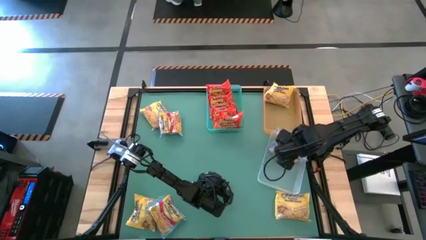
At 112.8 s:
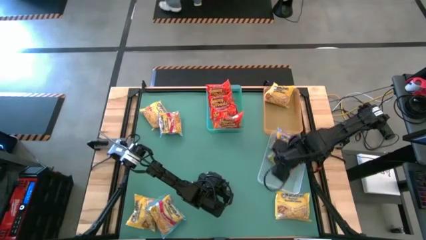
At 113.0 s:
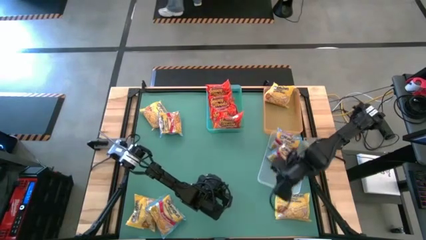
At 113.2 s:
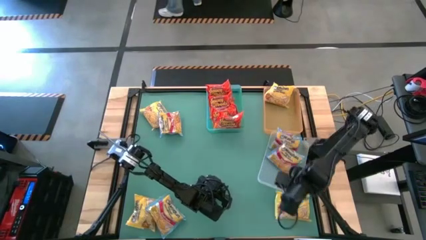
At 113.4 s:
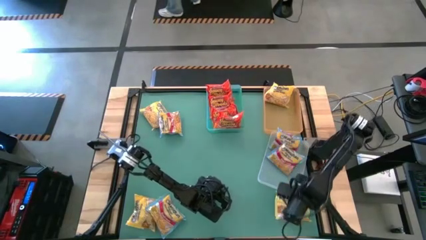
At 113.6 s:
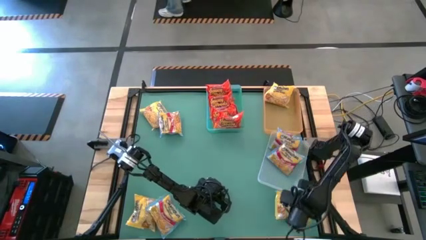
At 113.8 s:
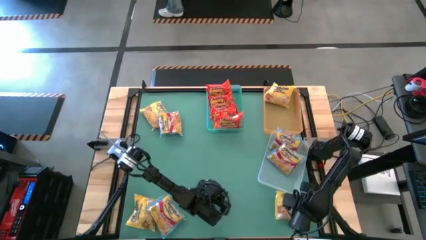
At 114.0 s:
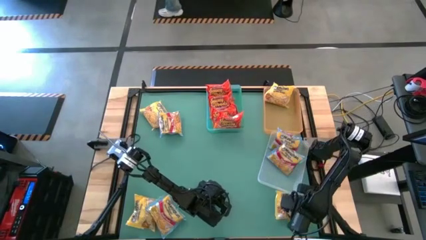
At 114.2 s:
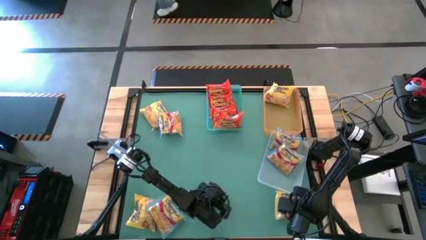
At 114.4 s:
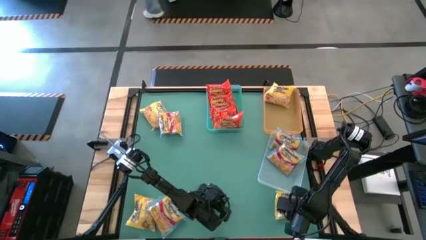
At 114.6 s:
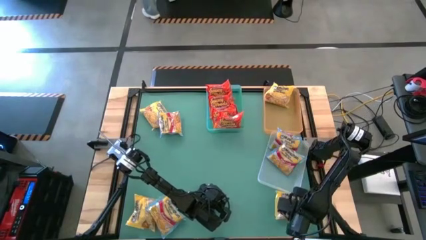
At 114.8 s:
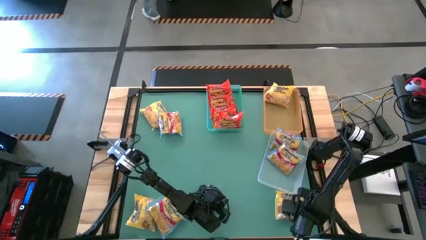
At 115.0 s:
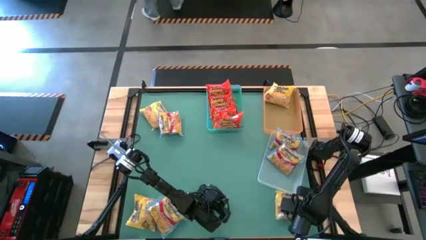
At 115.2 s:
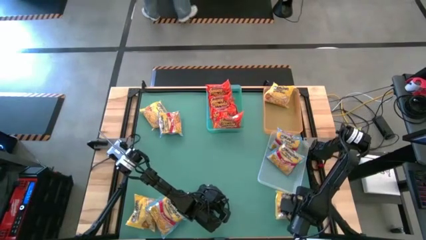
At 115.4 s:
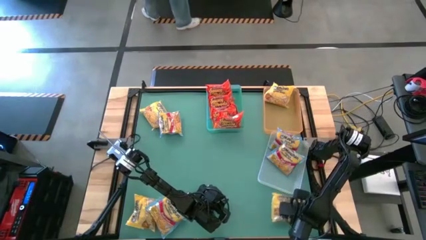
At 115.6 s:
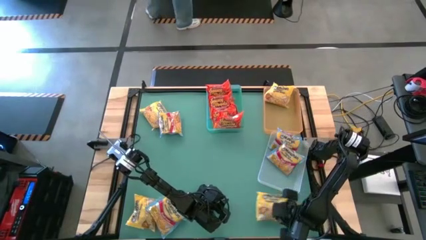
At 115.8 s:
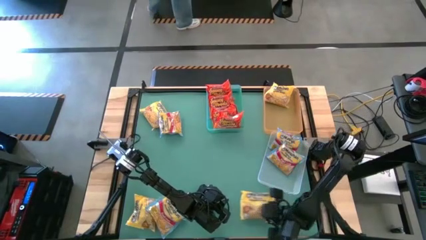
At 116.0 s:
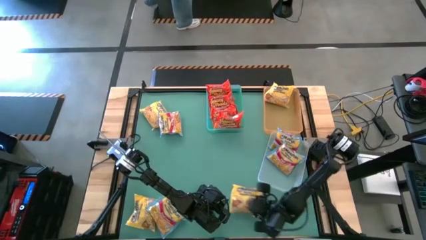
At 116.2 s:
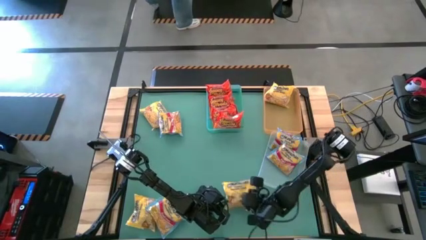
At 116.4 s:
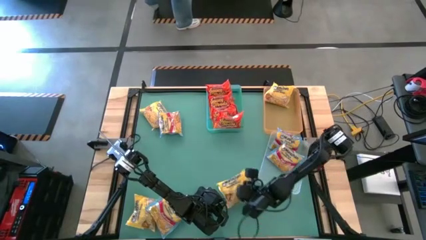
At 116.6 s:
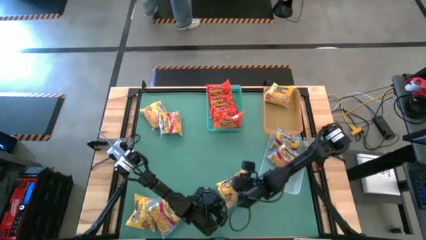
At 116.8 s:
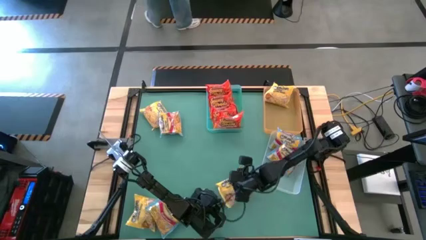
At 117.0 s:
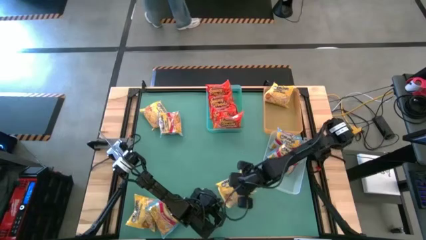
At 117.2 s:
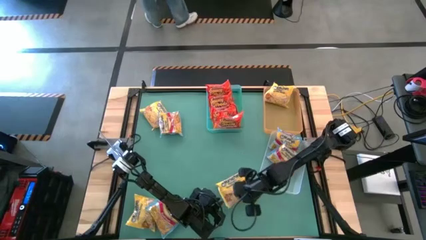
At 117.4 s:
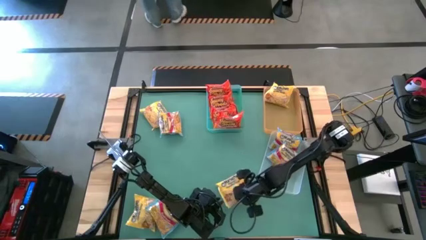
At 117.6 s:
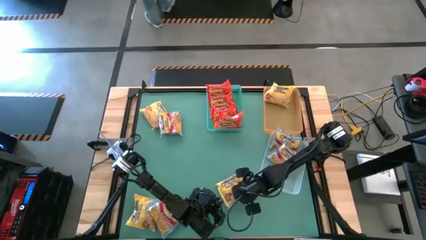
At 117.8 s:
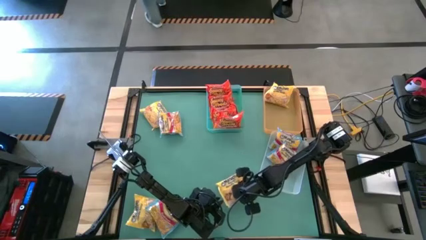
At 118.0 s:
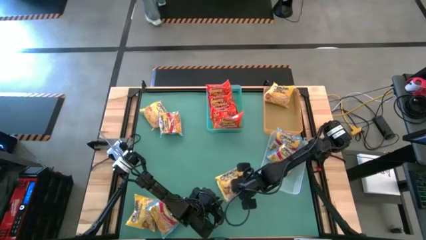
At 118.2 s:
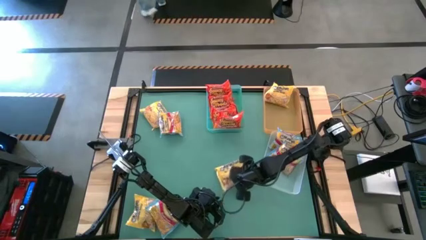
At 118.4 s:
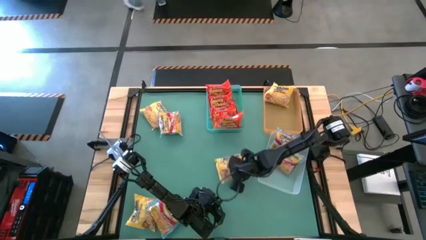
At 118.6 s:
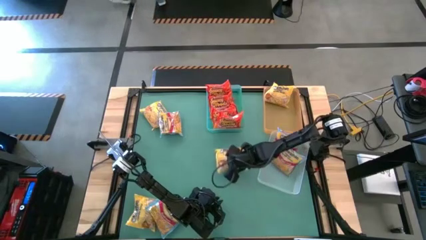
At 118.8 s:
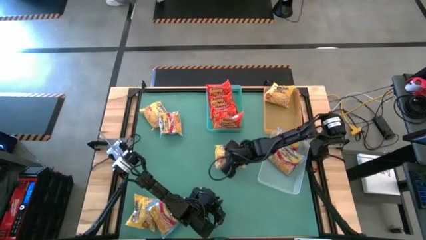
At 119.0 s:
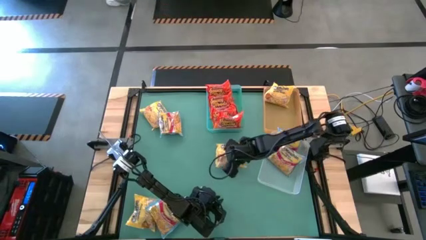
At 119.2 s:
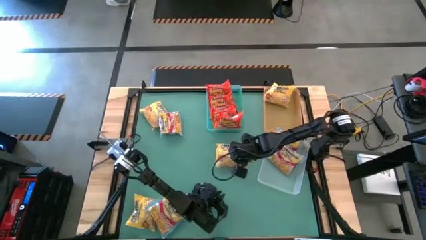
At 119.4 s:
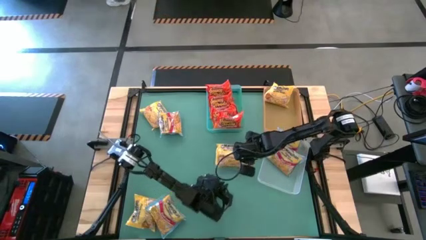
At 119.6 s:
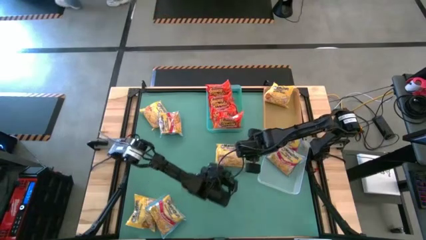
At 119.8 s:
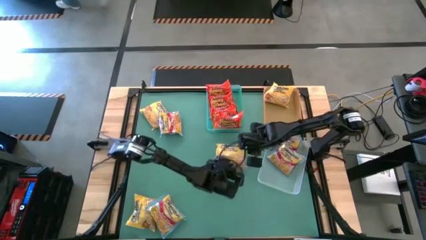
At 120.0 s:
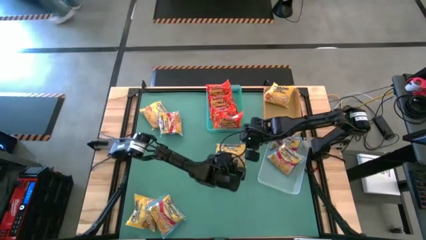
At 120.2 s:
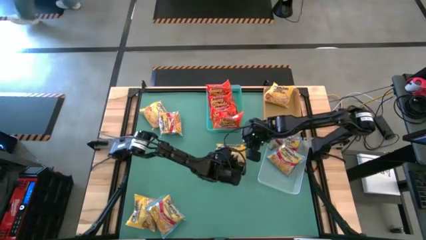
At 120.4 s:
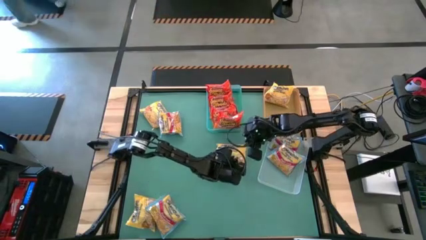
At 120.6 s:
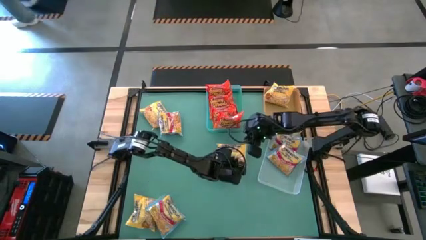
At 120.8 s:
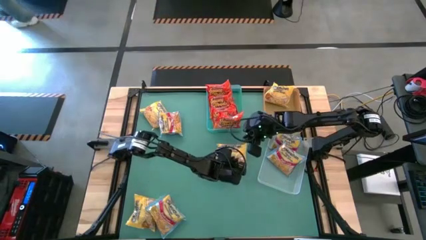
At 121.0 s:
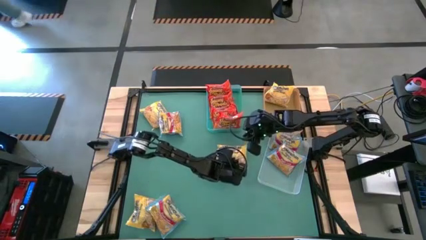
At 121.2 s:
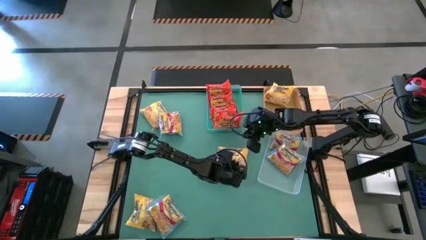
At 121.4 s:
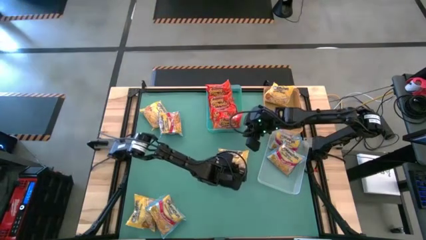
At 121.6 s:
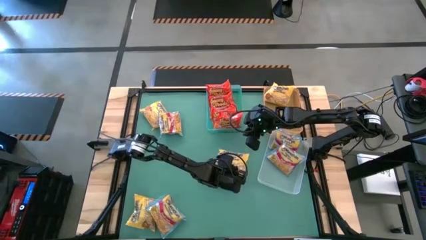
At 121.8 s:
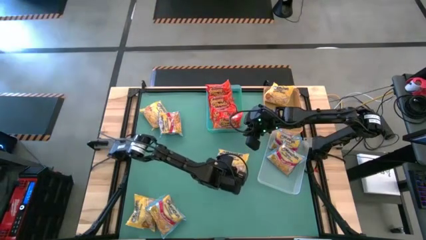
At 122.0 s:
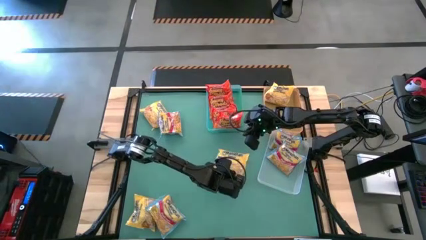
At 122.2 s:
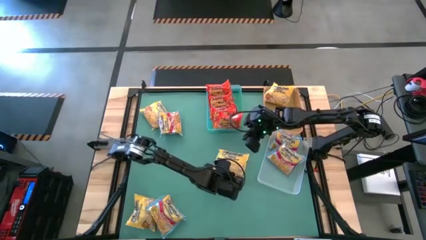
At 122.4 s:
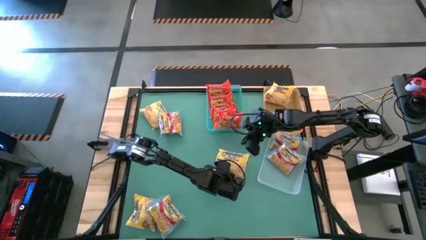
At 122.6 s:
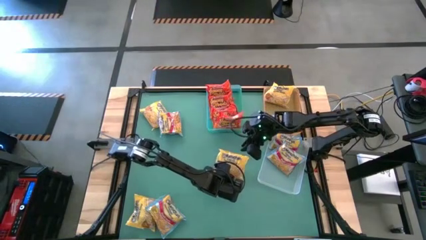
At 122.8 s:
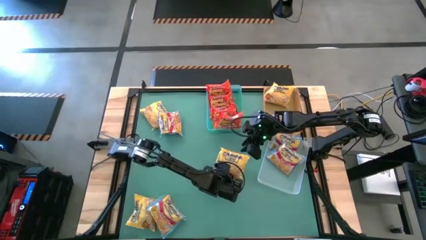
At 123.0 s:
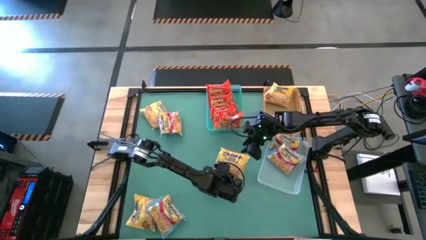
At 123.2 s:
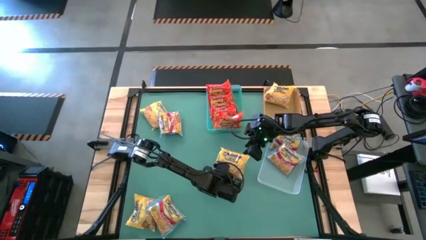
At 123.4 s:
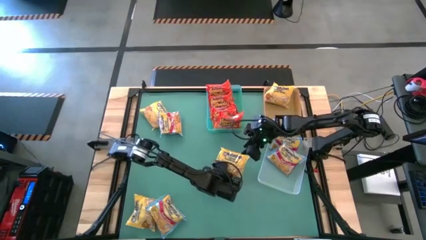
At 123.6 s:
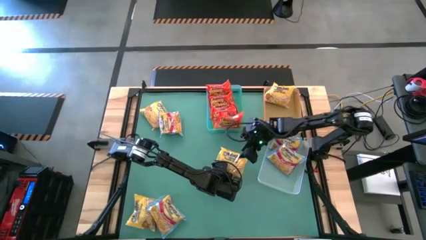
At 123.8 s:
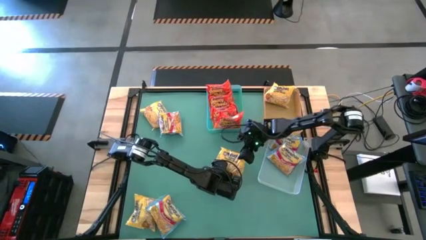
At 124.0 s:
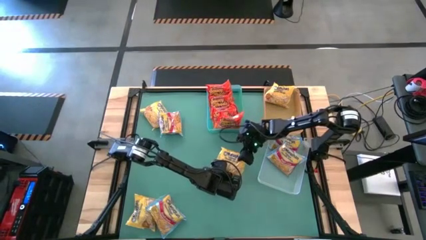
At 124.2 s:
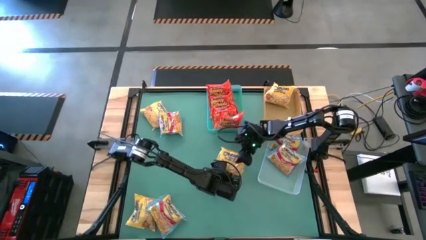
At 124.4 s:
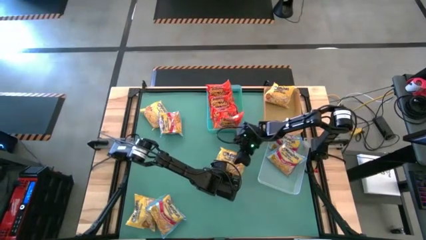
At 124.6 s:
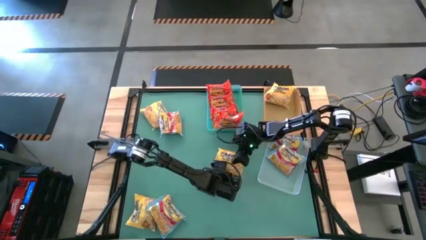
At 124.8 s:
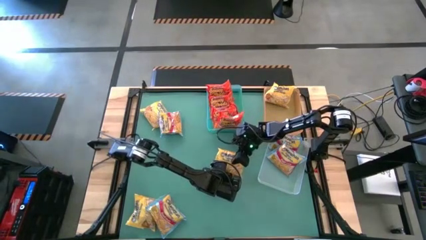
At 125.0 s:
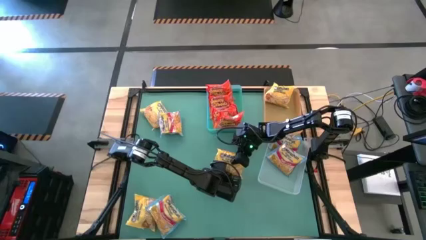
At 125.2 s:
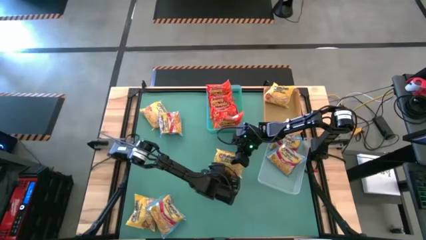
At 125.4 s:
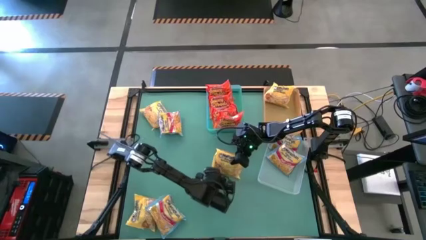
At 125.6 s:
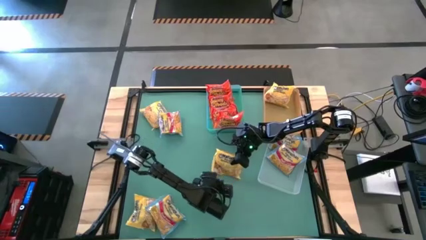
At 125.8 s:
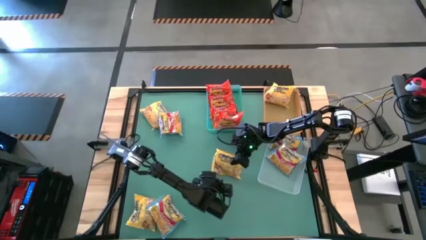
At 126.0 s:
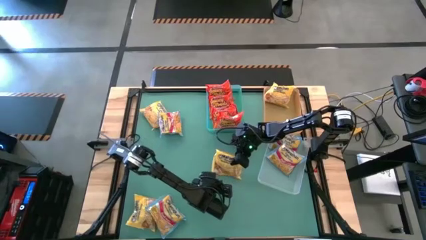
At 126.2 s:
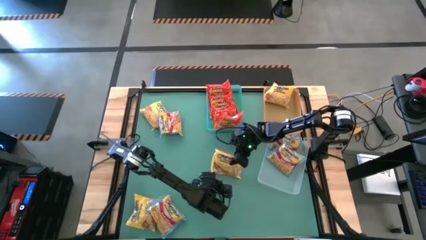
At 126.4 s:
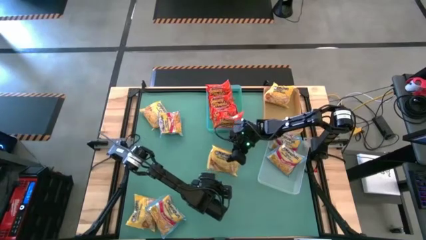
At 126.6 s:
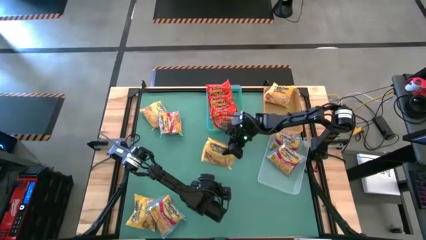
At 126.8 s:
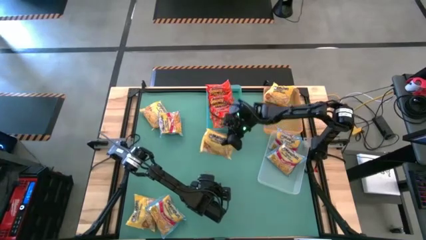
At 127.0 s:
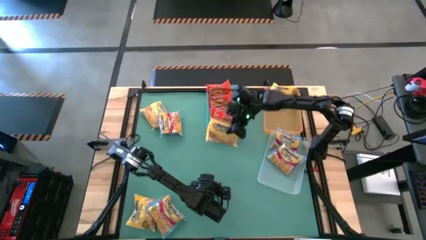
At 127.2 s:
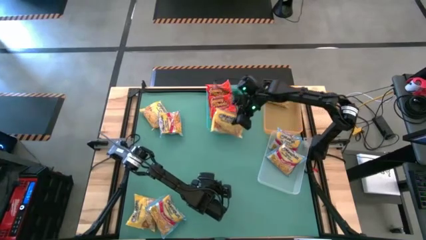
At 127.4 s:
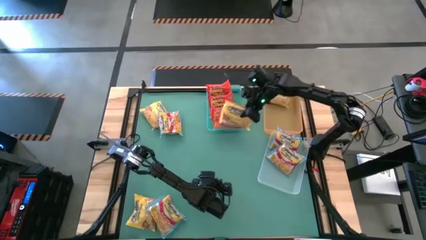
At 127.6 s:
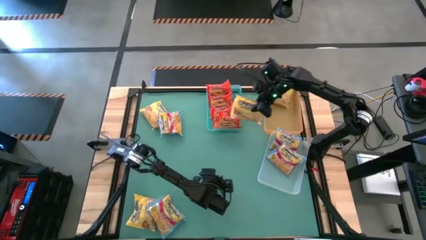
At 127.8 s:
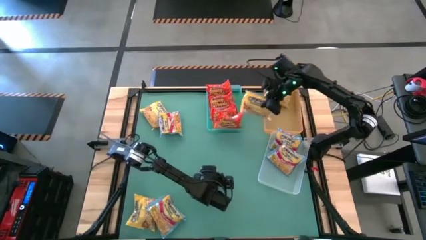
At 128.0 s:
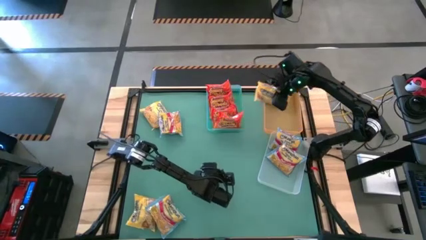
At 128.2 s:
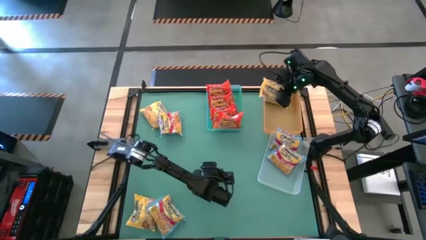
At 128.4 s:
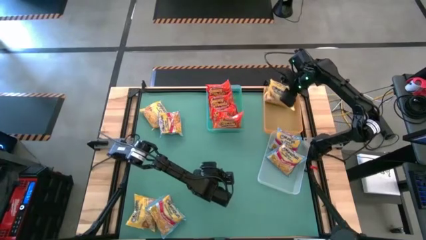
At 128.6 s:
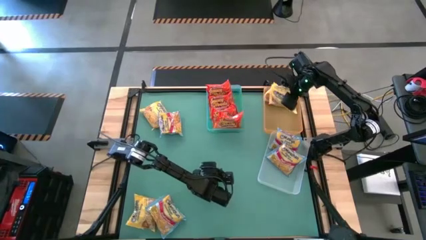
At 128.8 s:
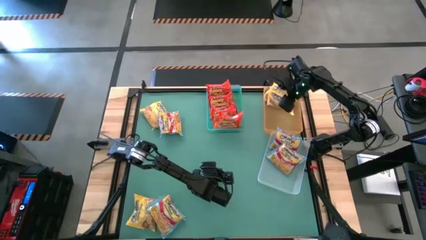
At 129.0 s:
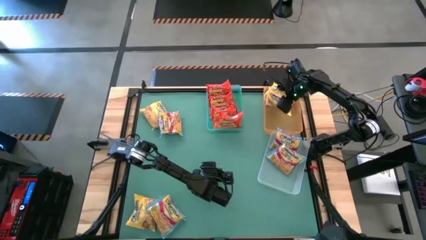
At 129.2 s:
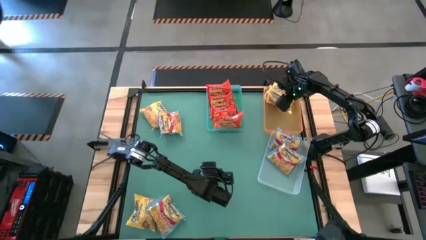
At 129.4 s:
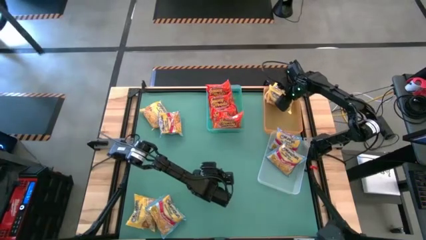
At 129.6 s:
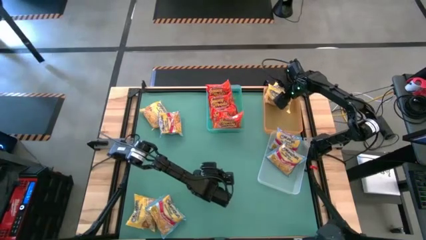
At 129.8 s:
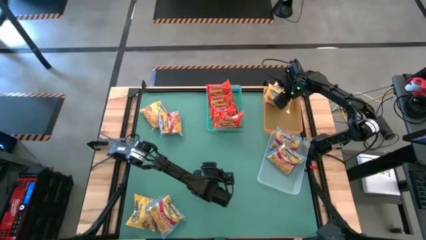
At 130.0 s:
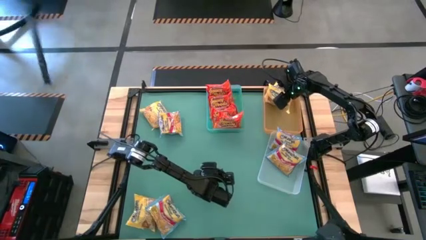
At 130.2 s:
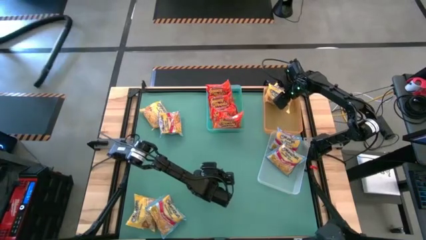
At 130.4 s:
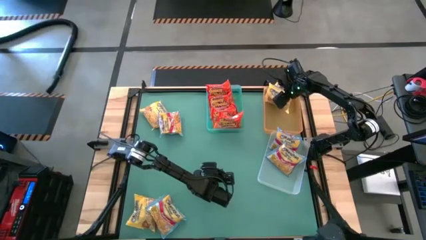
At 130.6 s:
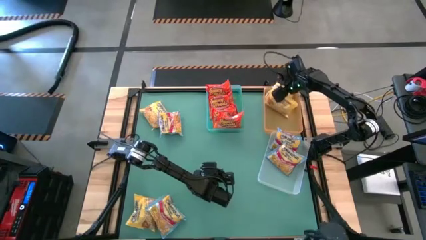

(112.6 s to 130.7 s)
Task: Sort Maruchan noodles
Put the yellow noodle pack into the orange bin
